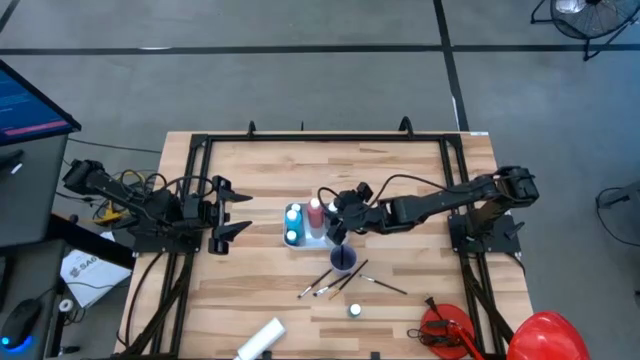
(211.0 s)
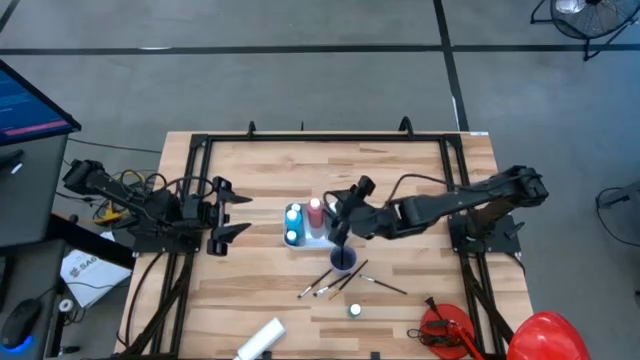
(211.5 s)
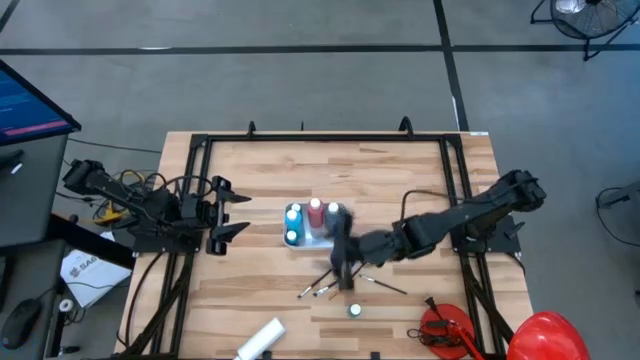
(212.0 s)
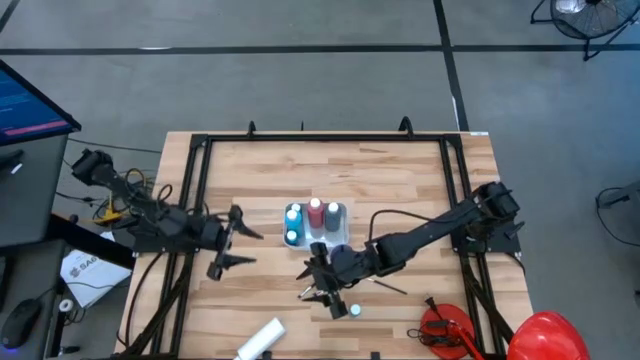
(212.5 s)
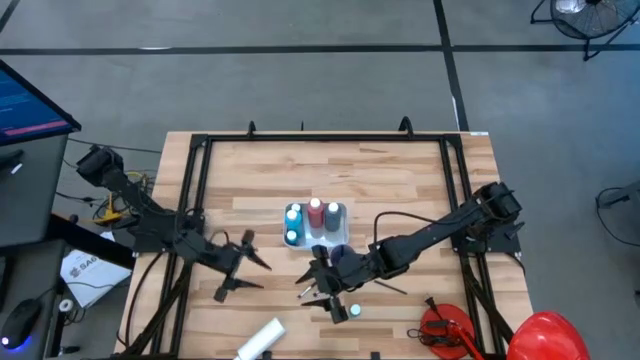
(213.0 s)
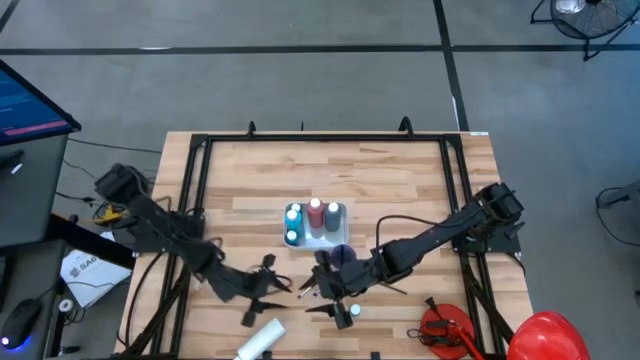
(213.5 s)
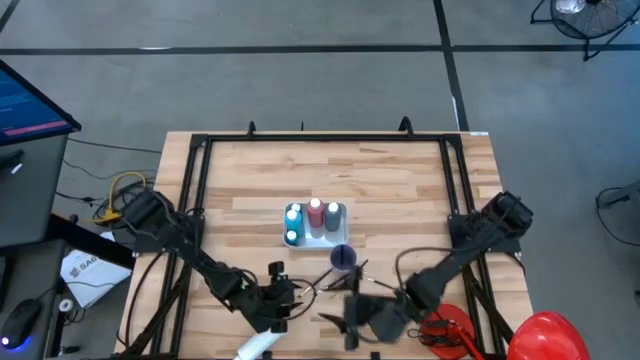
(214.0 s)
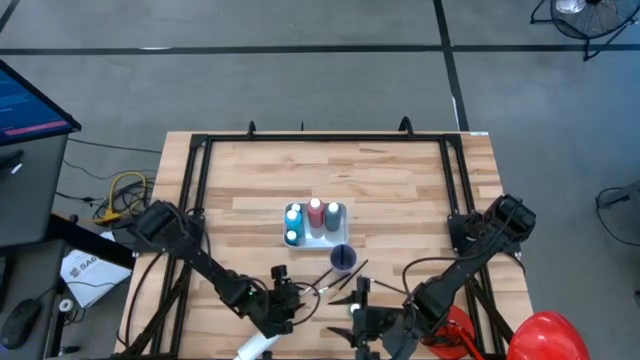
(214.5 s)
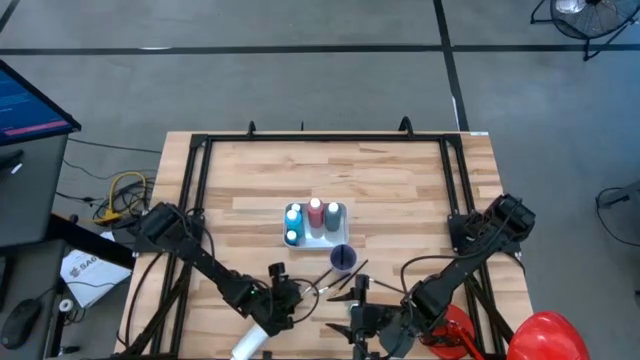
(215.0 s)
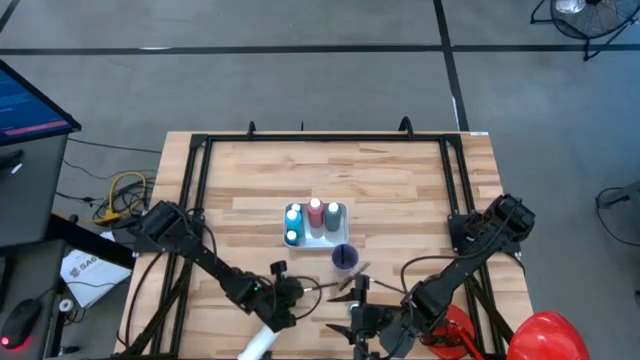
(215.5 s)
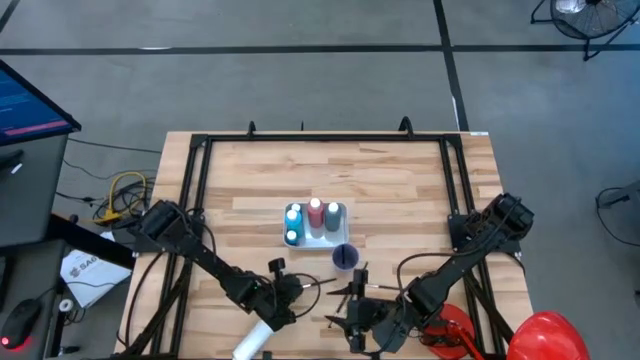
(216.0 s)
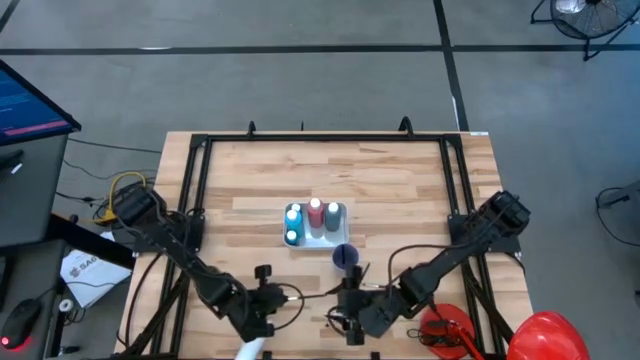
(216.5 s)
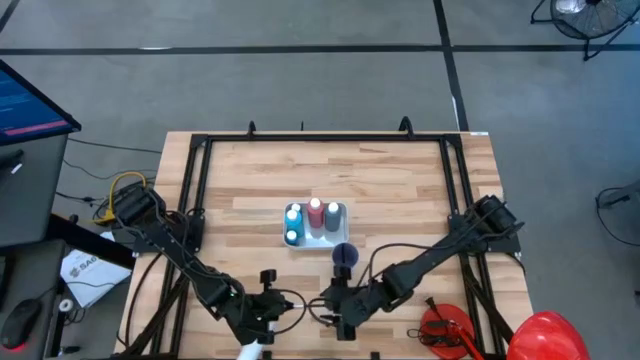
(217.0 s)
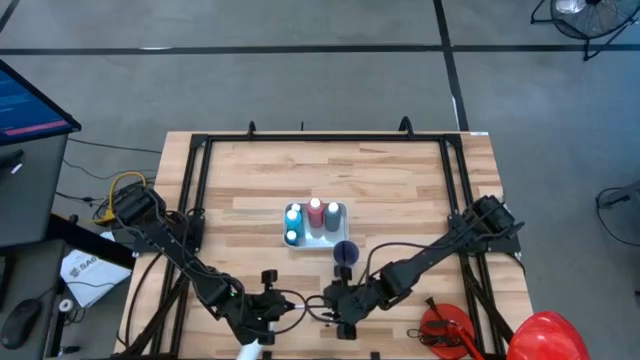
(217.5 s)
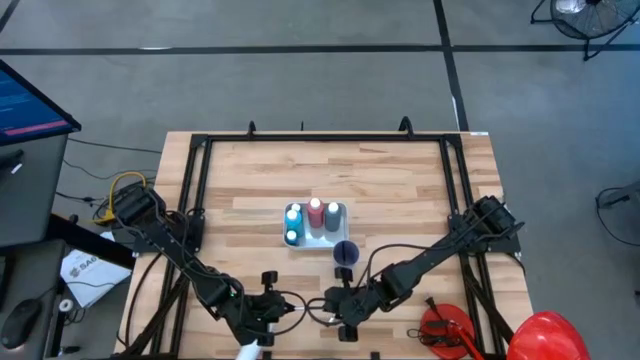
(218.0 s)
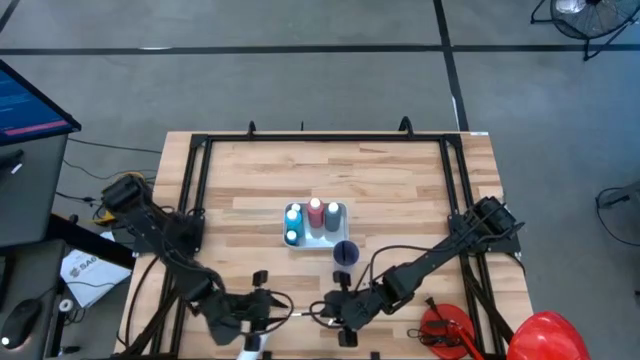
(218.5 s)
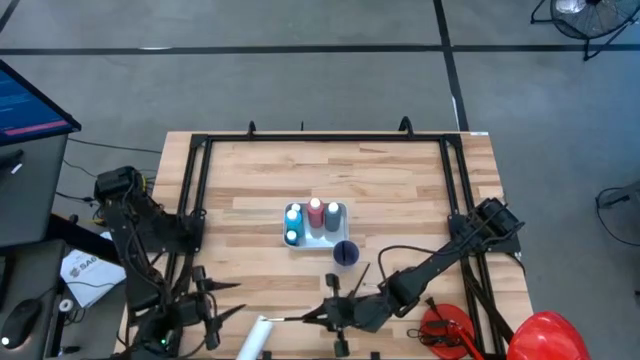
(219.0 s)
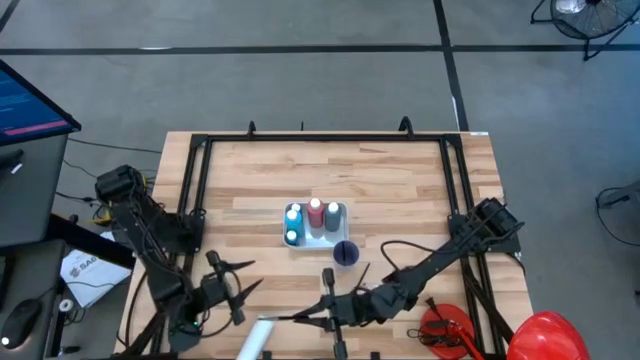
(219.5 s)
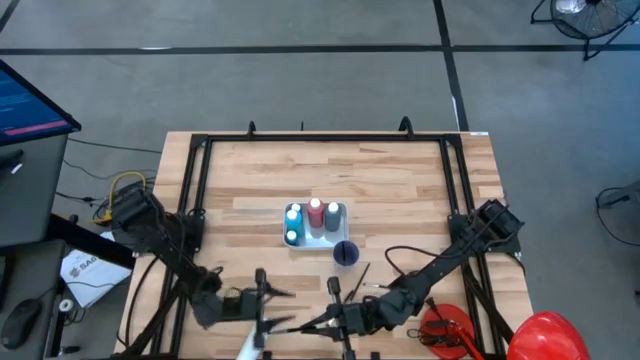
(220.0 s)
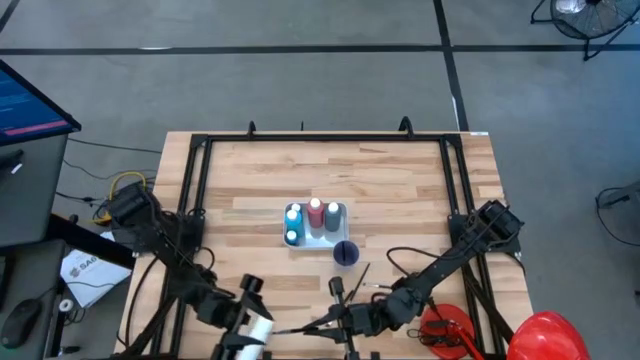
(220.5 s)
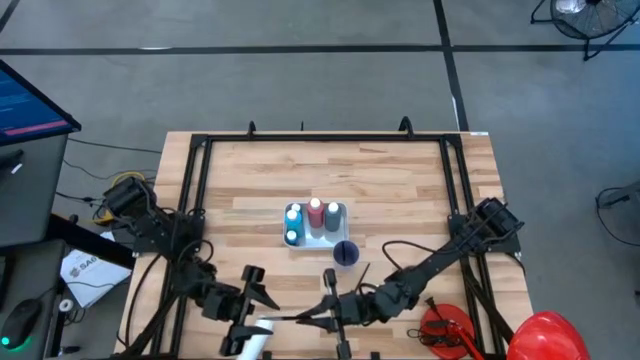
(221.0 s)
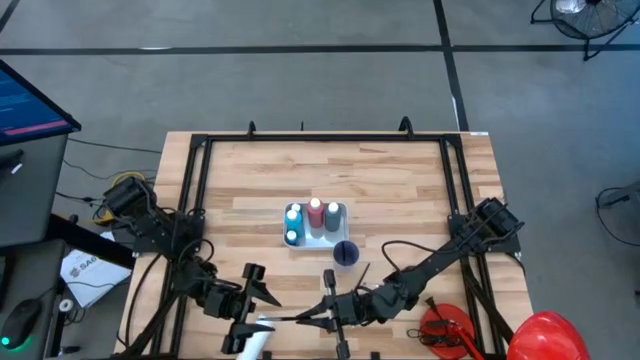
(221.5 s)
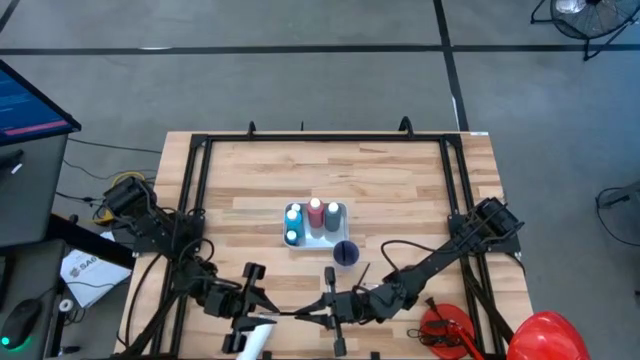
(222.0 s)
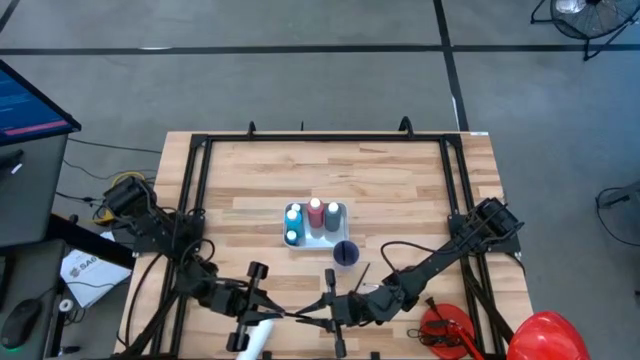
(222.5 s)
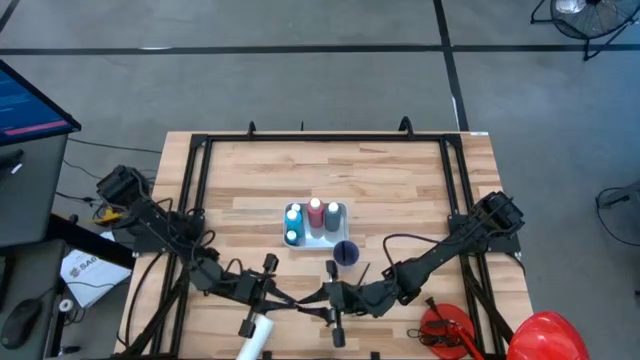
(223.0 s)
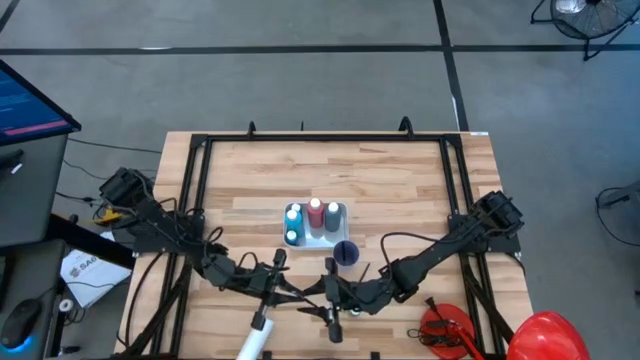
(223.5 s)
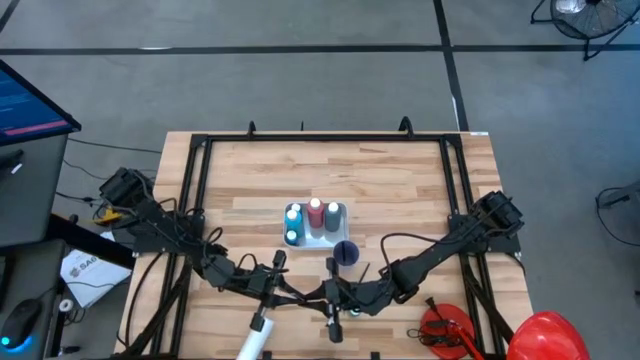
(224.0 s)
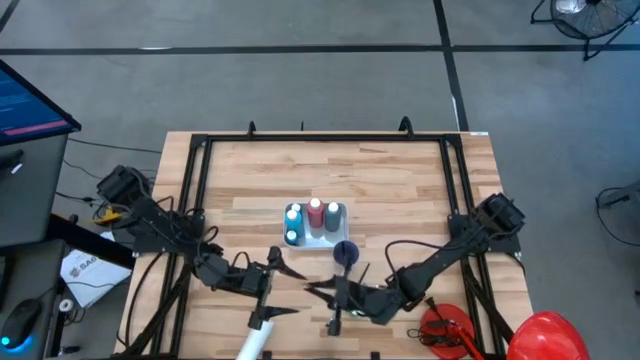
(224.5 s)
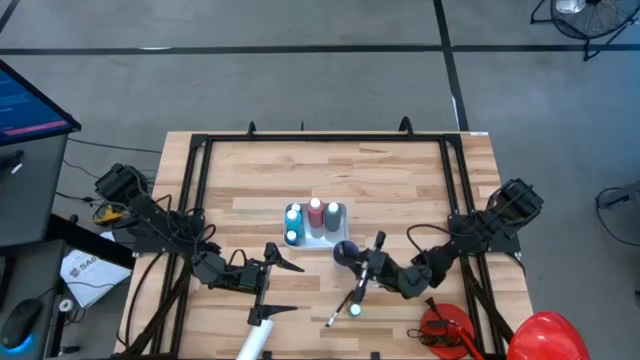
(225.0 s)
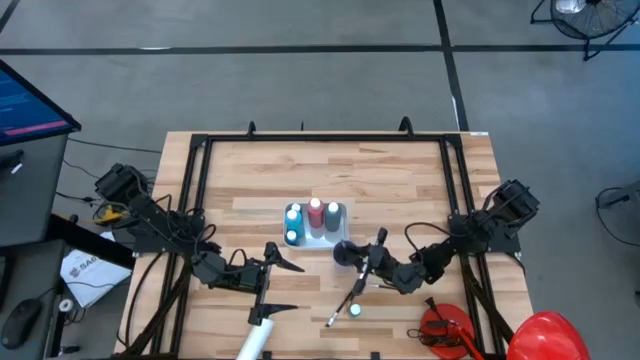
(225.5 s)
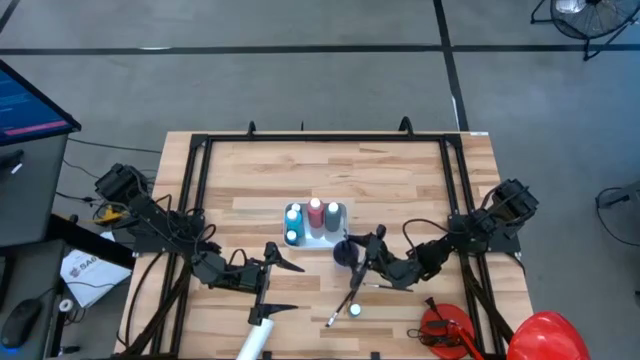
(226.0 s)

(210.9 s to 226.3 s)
Task: Pick & Place Paint Supplies
Put the silver paintbrush into the blue cup

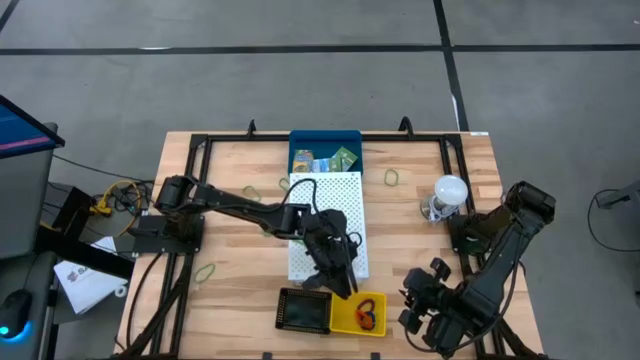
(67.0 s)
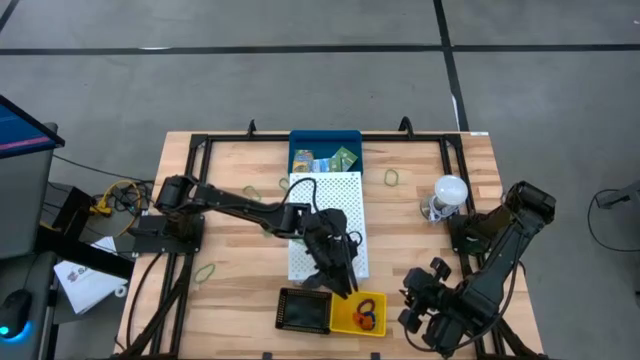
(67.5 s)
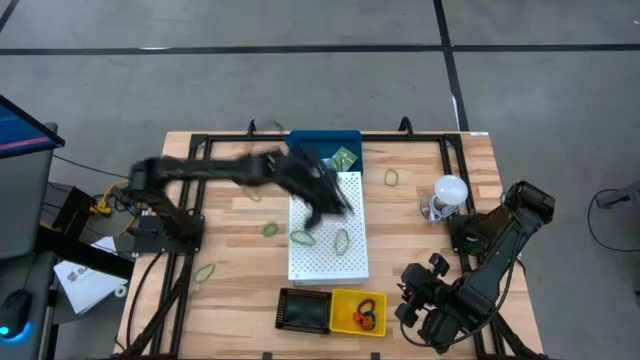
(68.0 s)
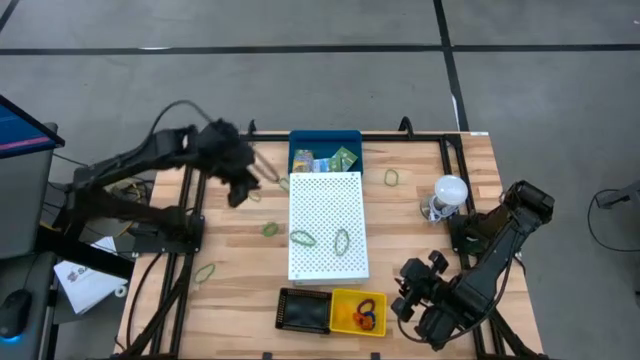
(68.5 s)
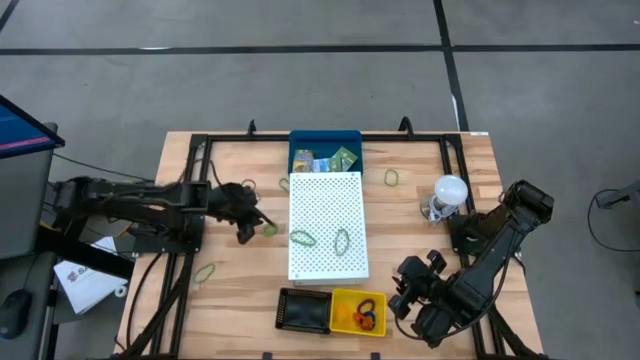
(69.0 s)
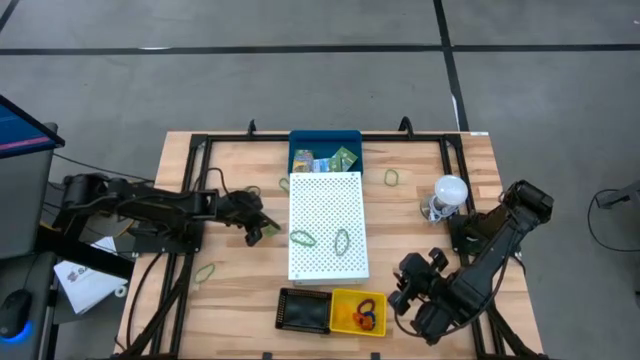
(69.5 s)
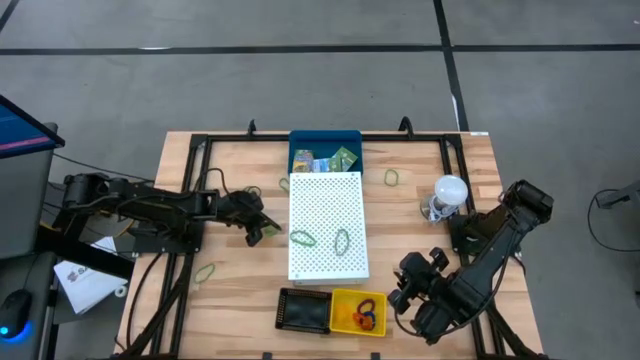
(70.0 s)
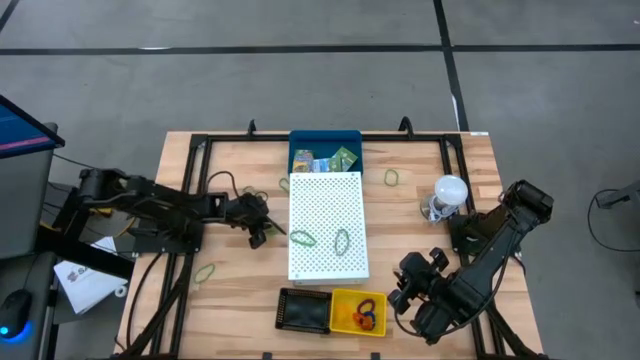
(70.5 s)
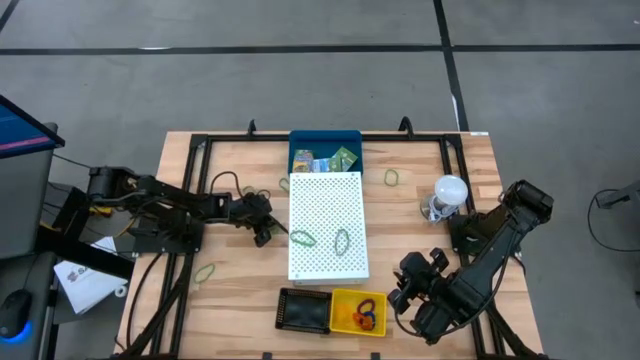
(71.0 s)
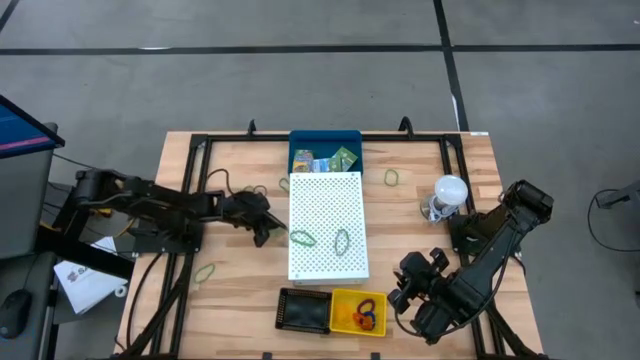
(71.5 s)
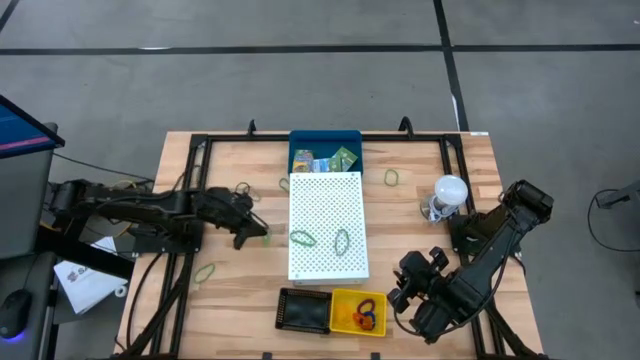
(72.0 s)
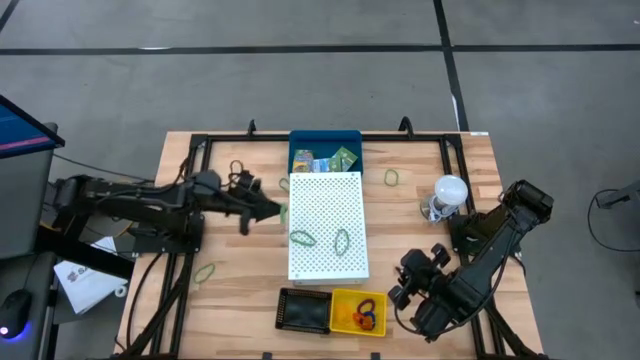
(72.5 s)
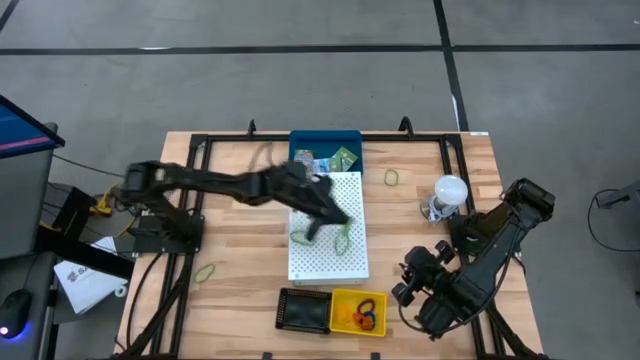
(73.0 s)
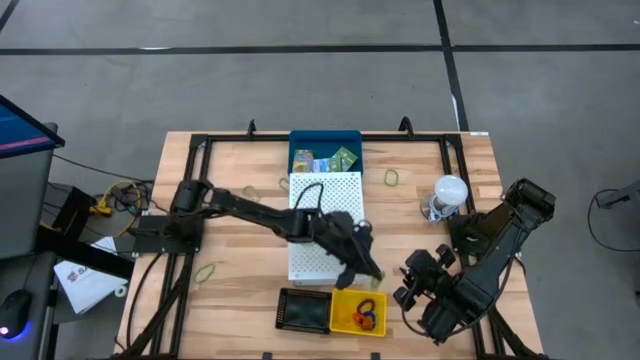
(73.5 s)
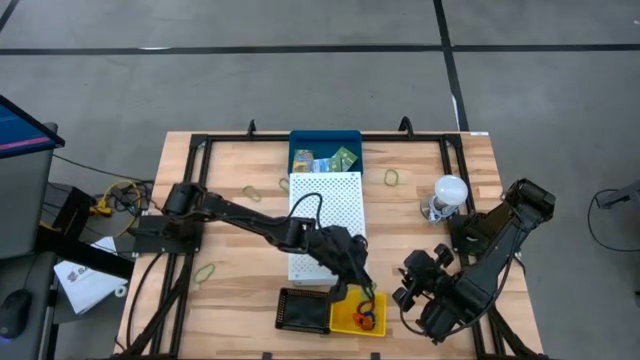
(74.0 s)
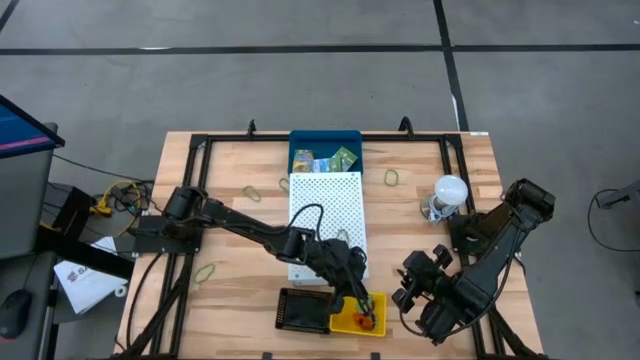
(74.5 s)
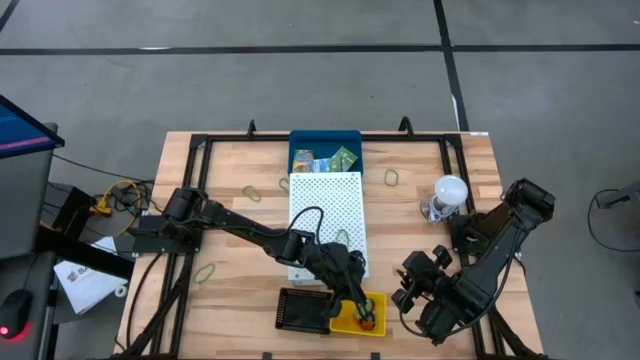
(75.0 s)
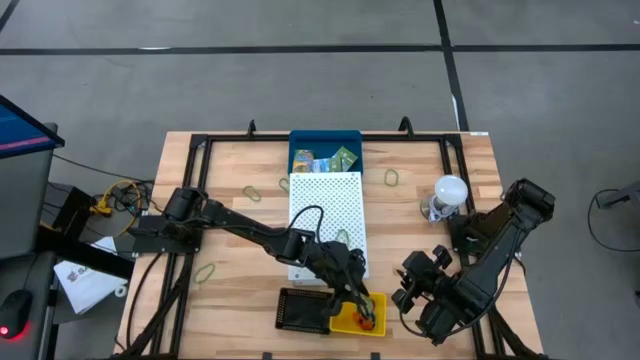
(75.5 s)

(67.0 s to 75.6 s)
Task: Pick & Place Office Desk Supplies
Put the green spring keychain into the yellow bin
